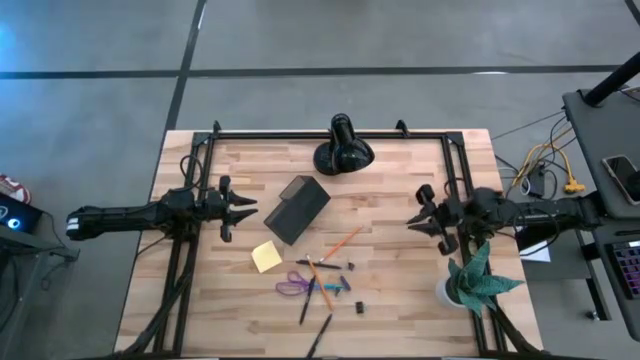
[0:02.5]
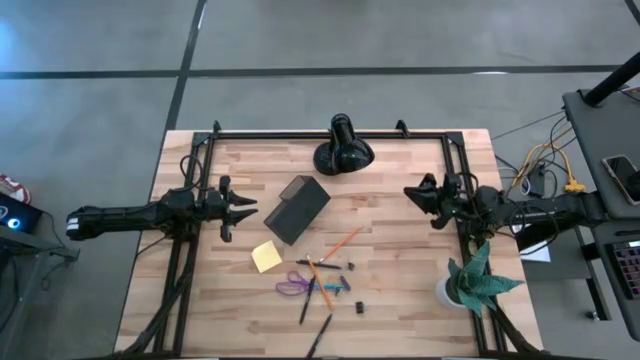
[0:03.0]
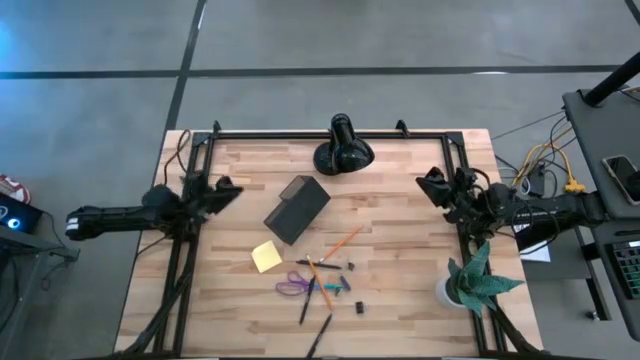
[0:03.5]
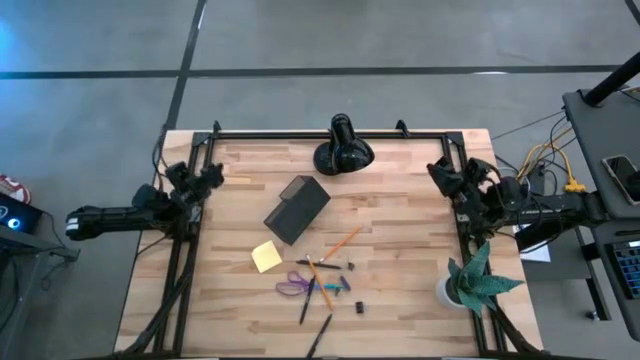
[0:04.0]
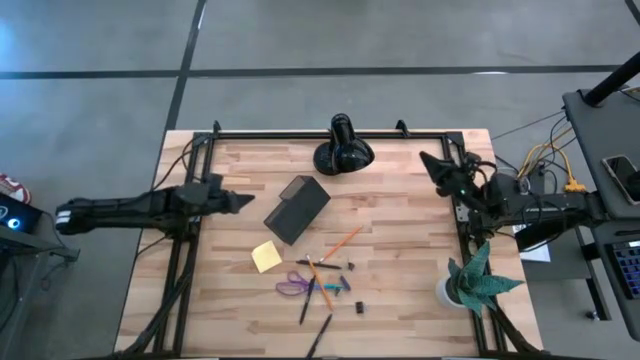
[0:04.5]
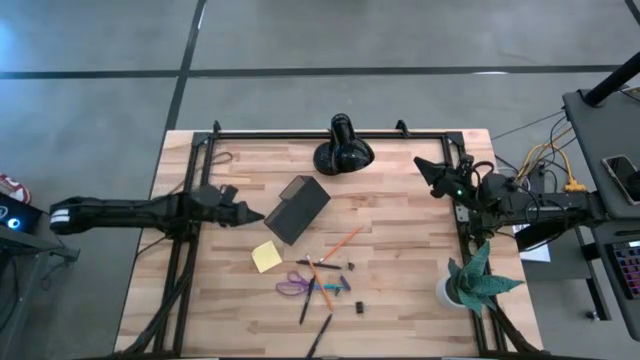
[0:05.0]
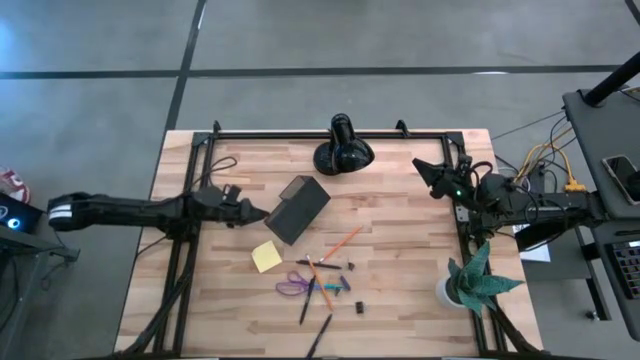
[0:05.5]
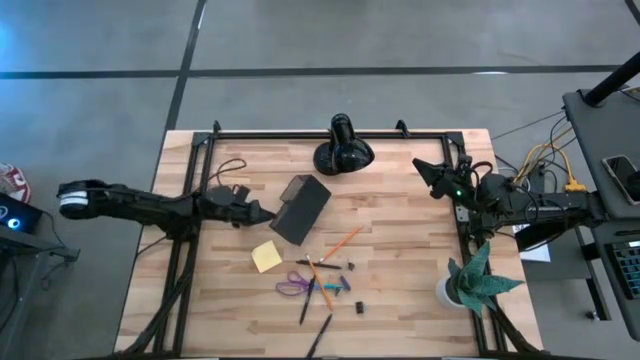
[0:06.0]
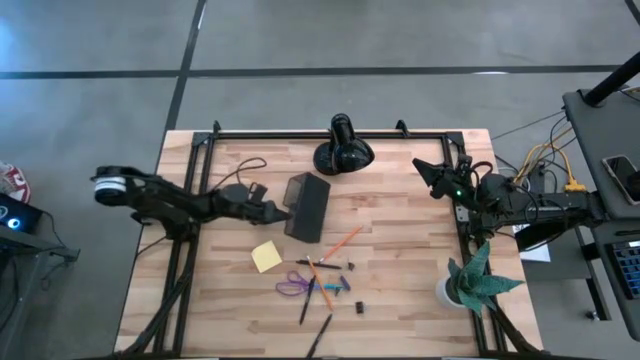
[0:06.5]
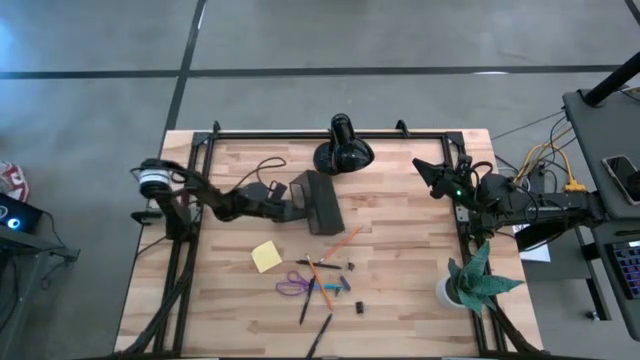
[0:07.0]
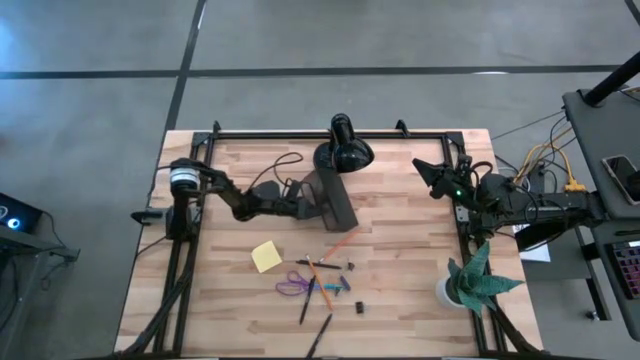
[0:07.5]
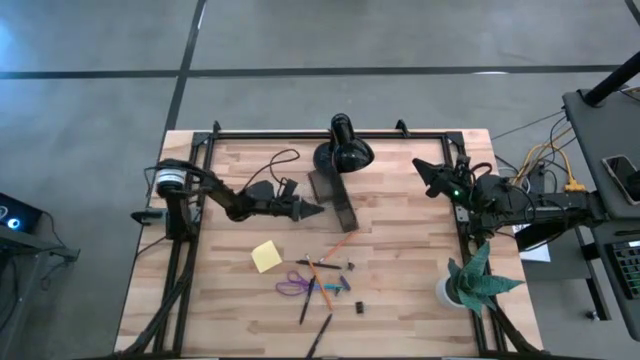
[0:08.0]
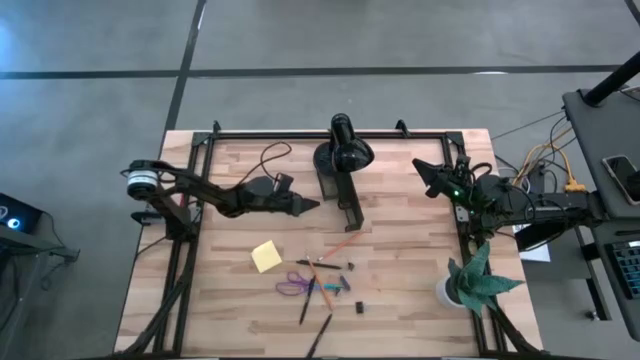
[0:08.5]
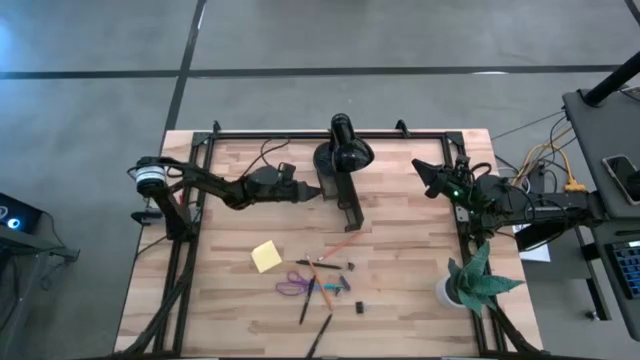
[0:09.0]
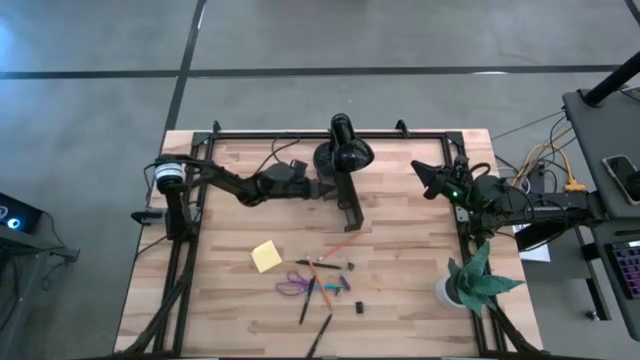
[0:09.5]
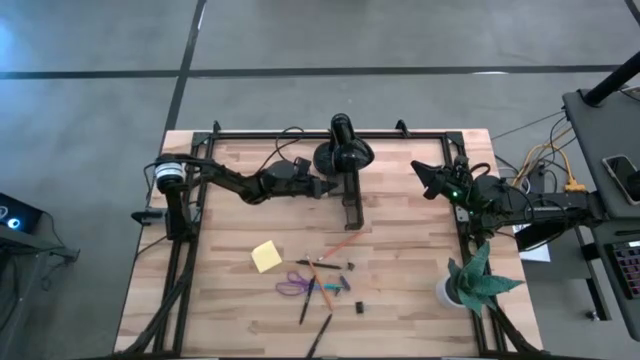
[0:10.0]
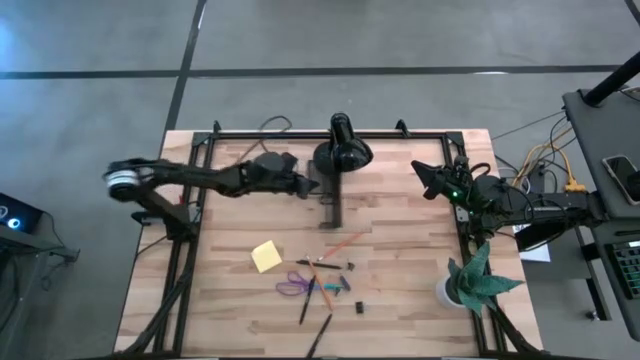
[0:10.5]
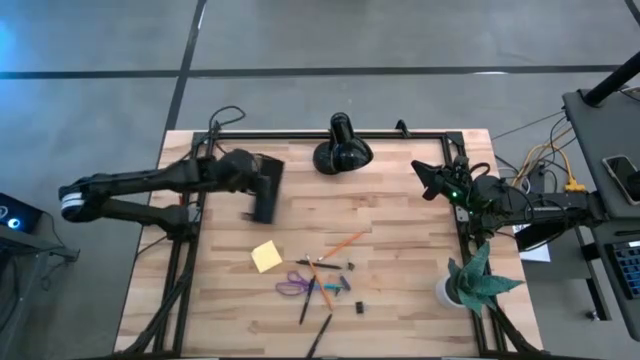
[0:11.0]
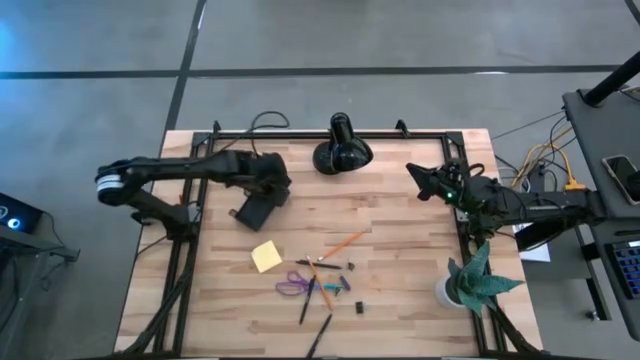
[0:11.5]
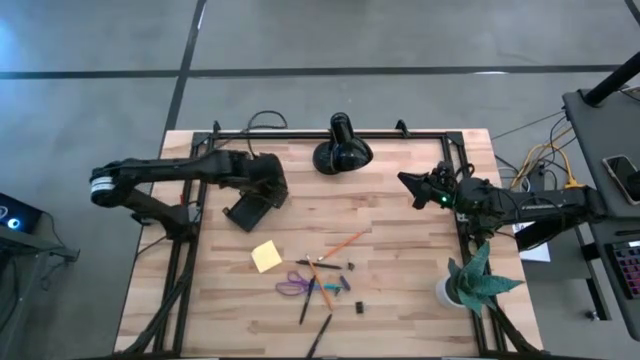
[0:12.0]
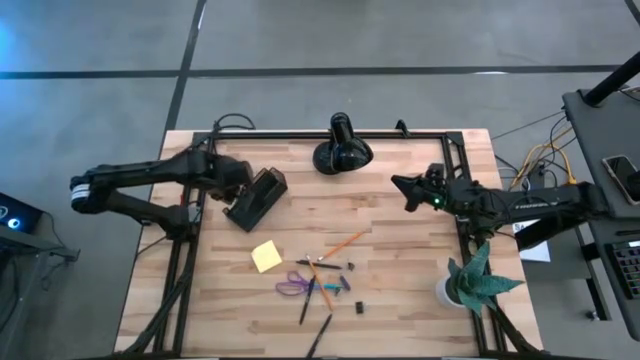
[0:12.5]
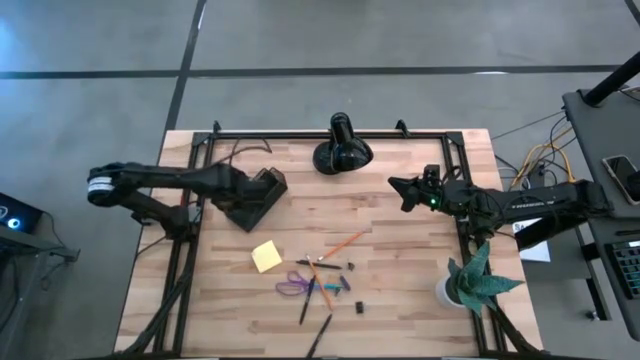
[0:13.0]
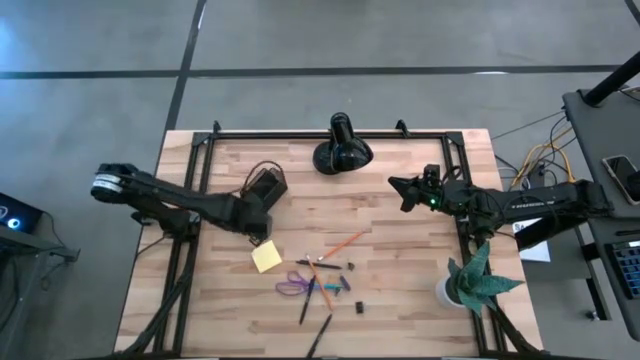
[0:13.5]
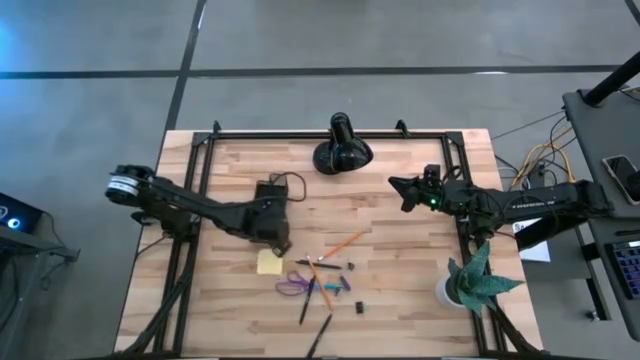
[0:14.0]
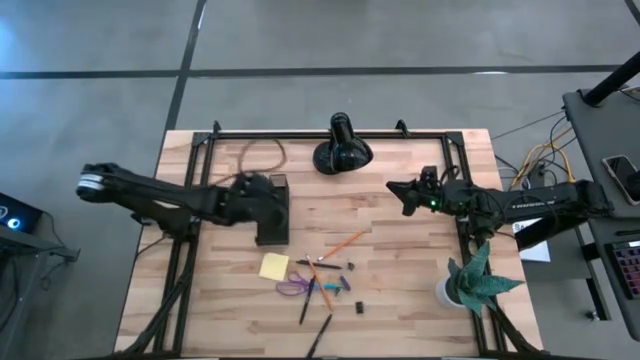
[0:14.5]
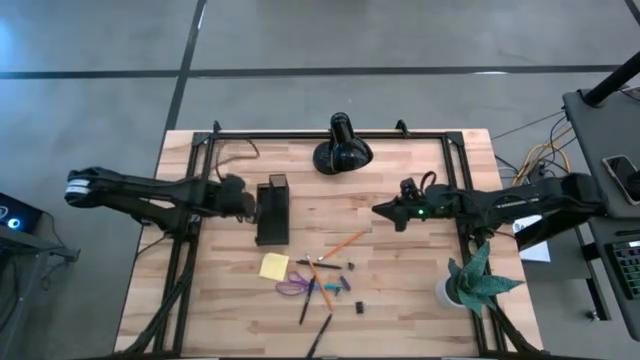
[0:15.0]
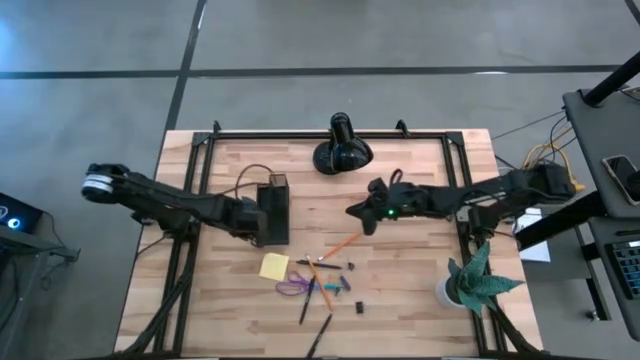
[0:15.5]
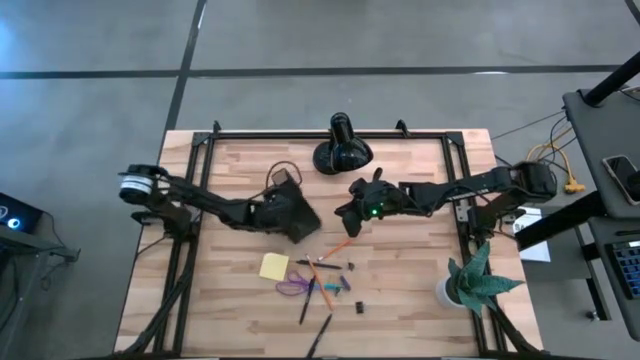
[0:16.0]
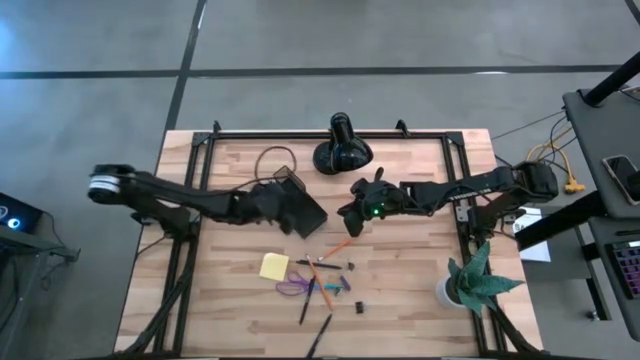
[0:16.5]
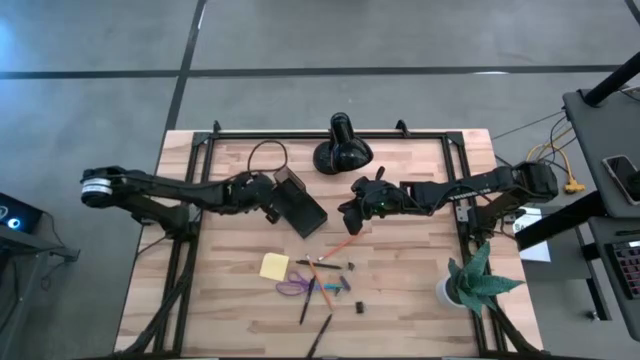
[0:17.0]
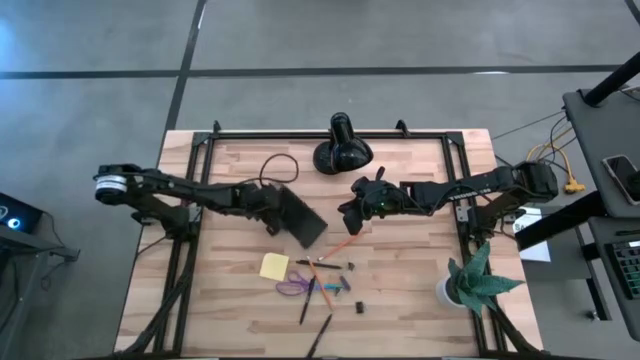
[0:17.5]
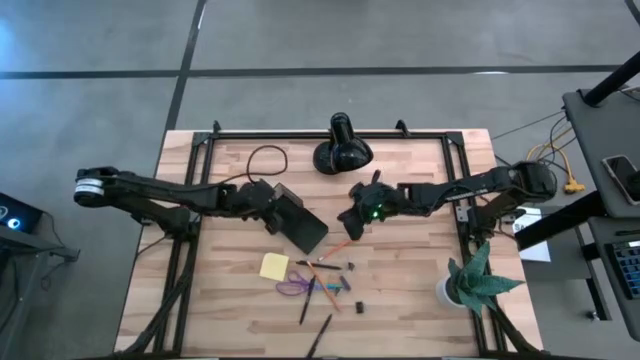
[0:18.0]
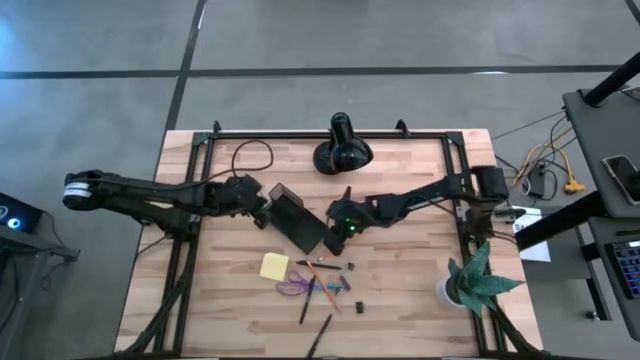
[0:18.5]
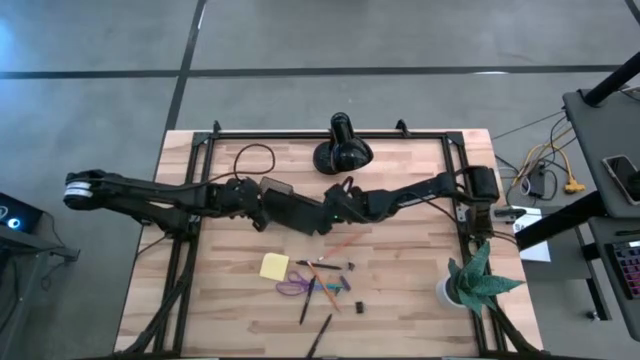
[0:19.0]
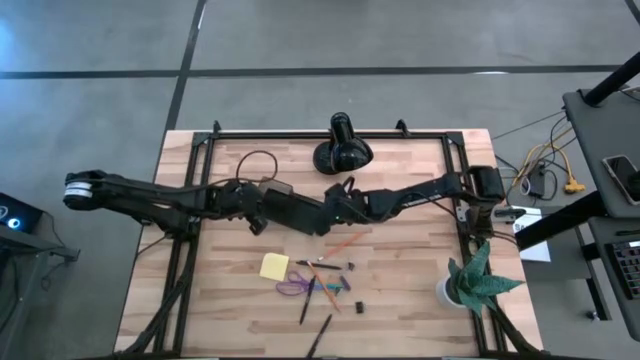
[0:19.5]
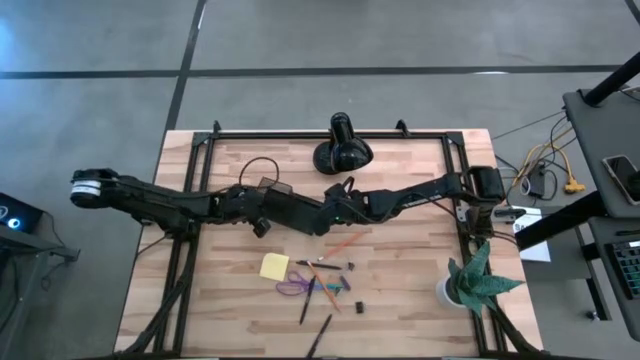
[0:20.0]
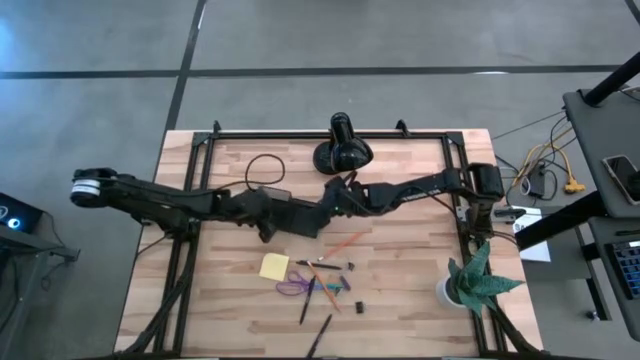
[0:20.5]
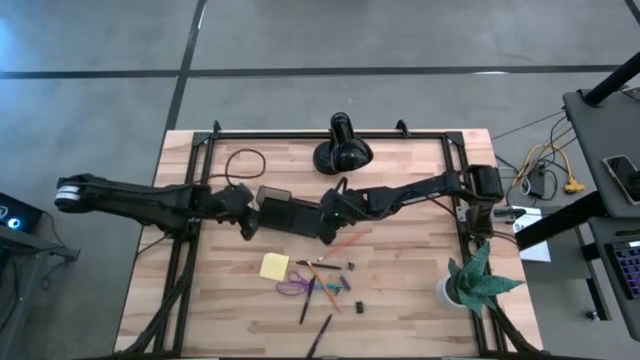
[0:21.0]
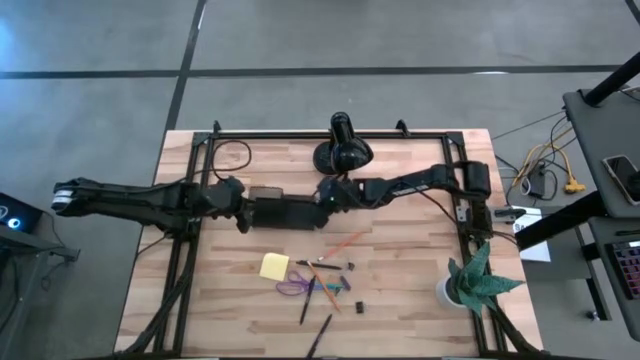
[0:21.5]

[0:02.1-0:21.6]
Task: Pick and place office supplies into organizer
Prepare the black desk organizer

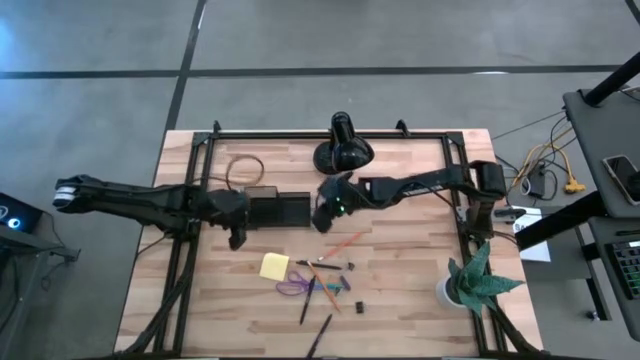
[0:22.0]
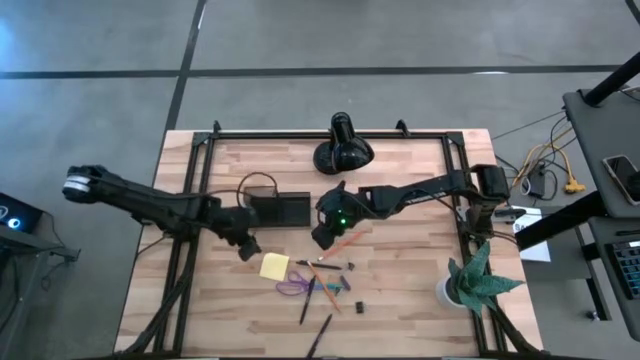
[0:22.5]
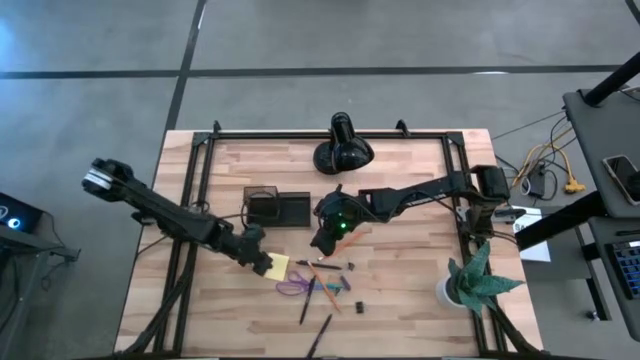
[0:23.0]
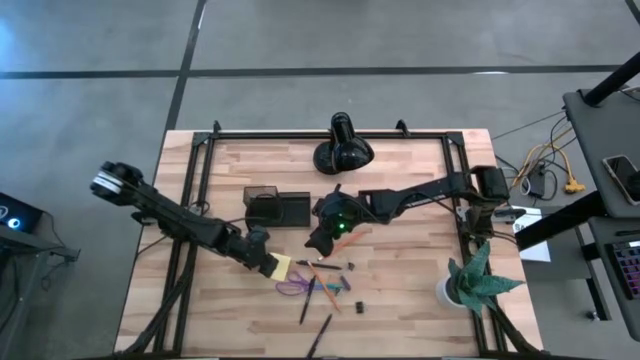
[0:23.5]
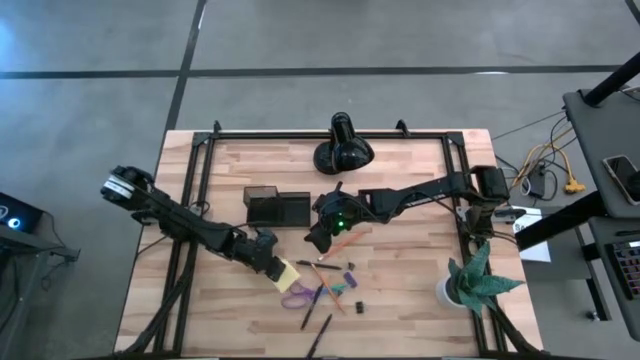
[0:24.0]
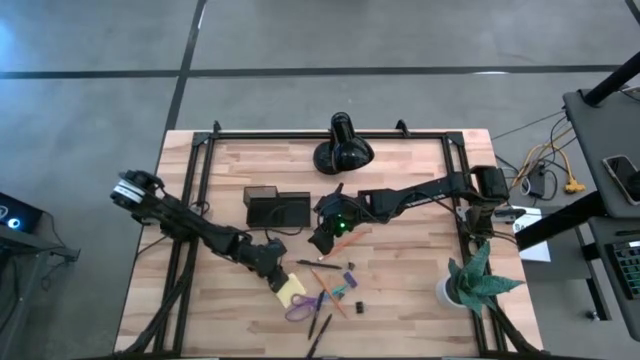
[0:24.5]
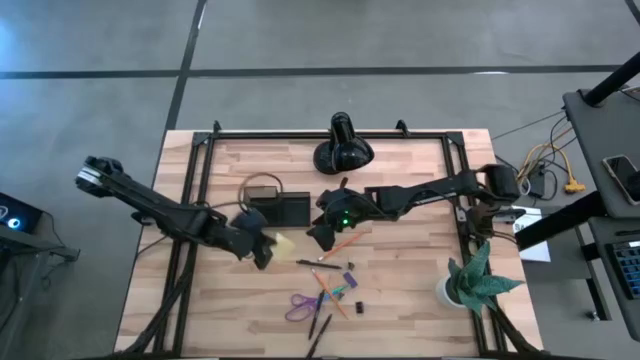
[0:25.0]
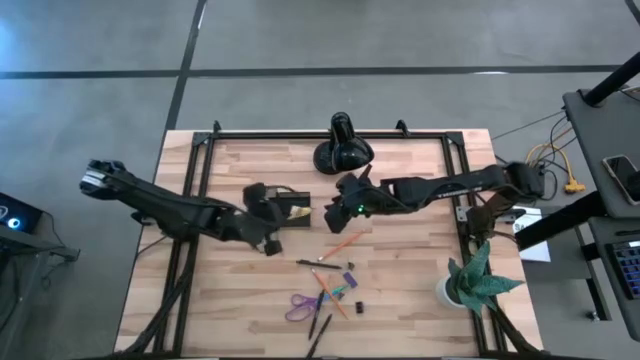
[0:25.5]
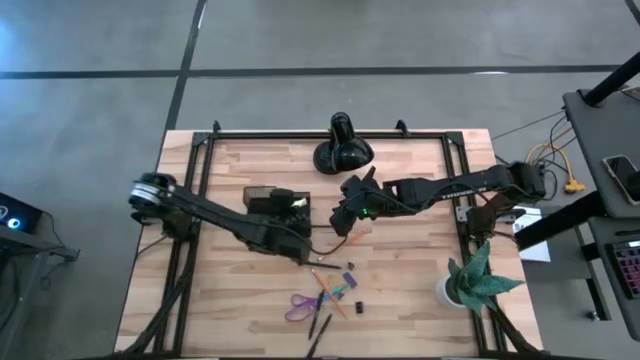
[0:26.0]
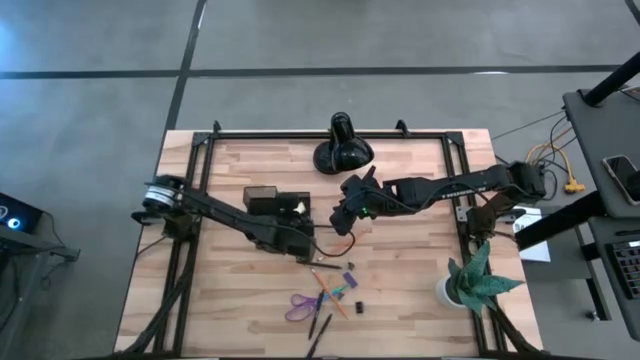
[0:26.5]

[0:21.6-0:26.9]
Put the yellow sticky notes into the black desk organizer
